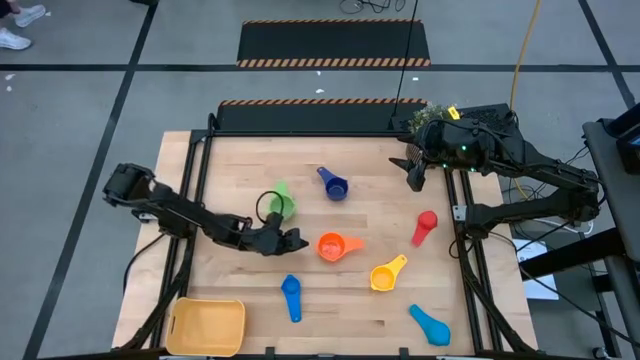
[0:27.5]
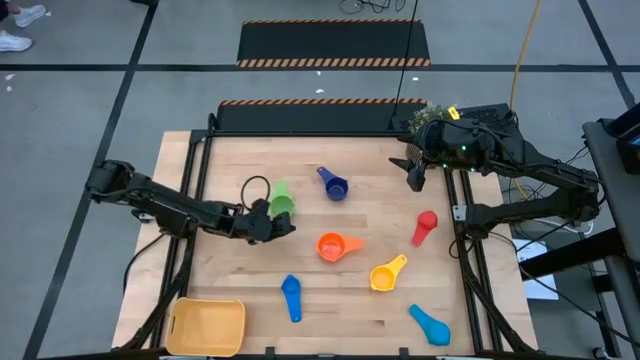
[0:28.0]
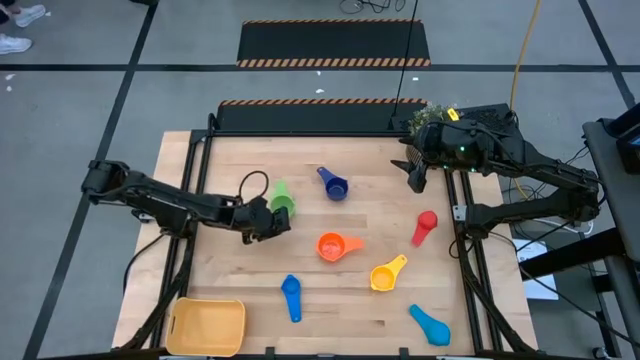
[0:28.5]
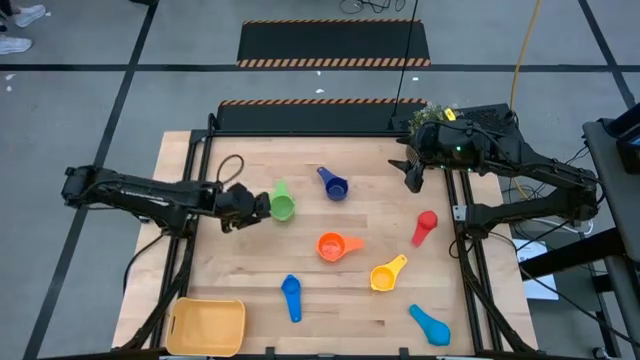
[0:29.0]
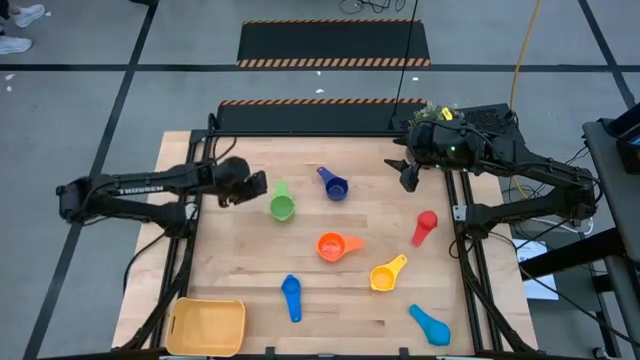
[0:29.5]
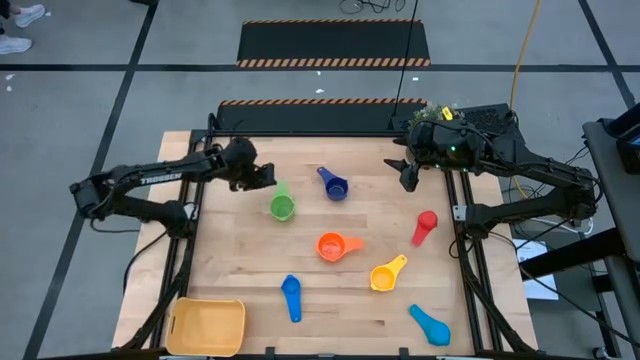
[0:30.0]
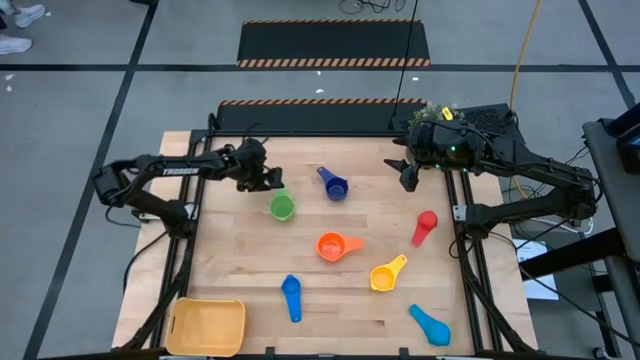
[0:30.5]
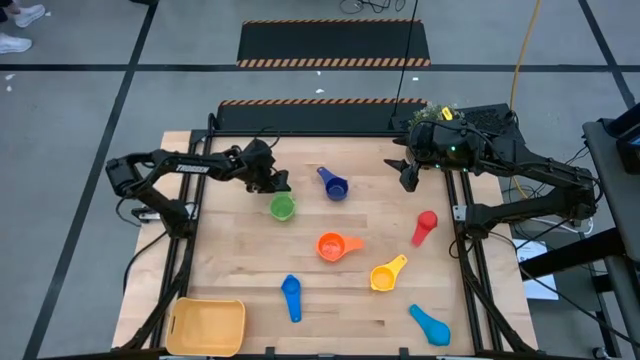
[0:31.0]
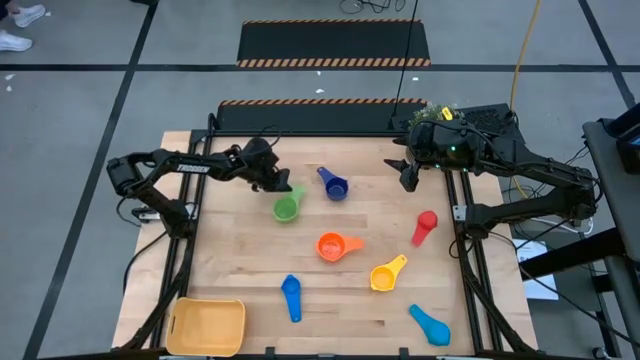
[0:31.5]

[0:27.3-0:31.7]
Task: Nest measuring cups in basket
Stack the green measuring cup on top of the orange measuring cup

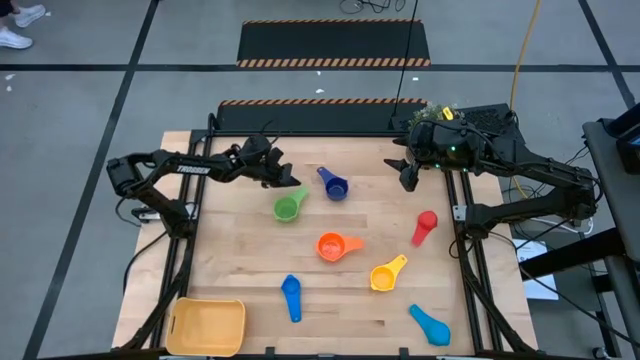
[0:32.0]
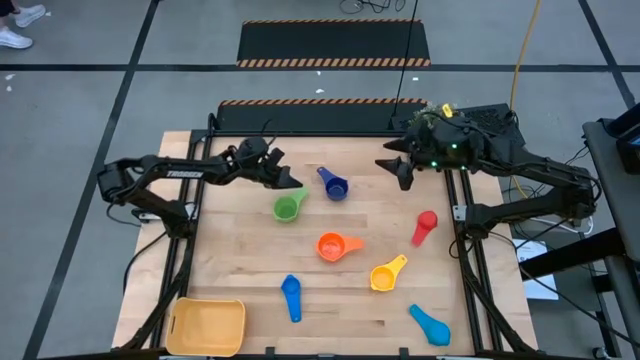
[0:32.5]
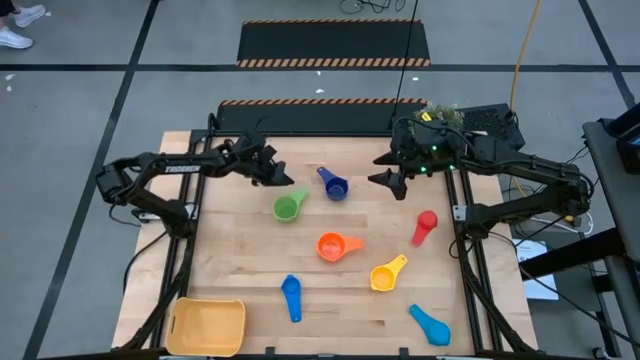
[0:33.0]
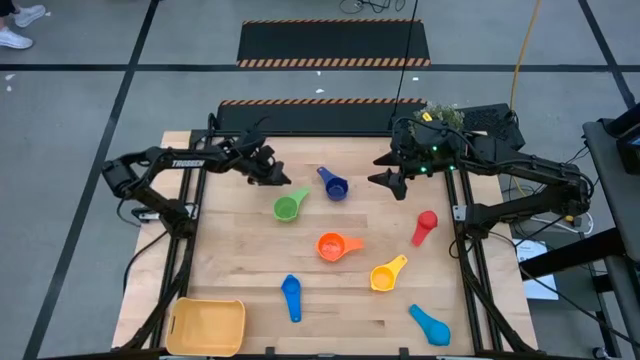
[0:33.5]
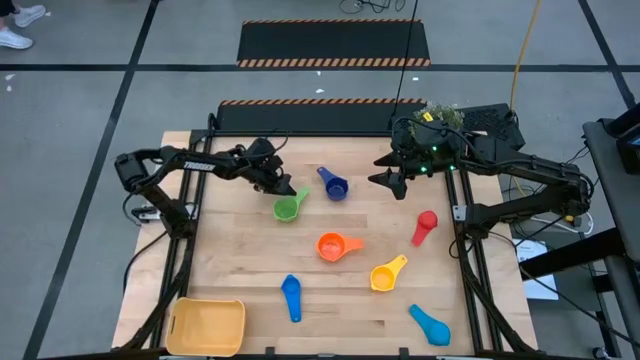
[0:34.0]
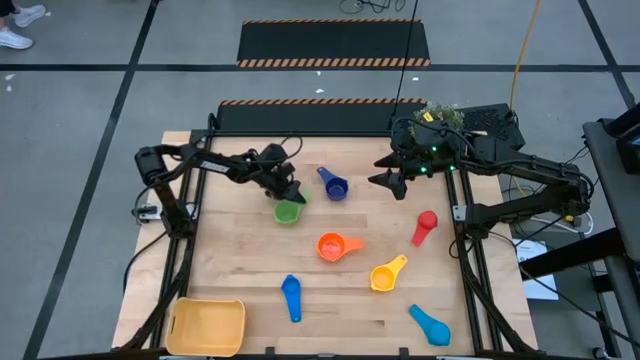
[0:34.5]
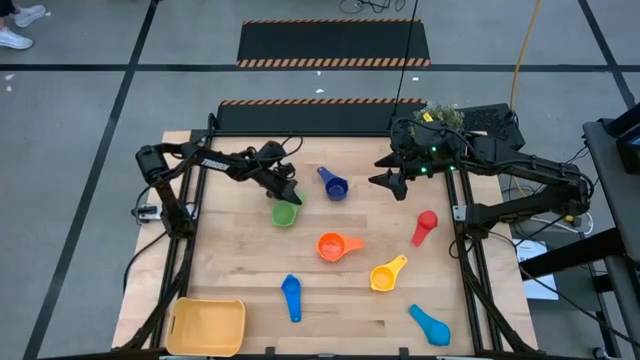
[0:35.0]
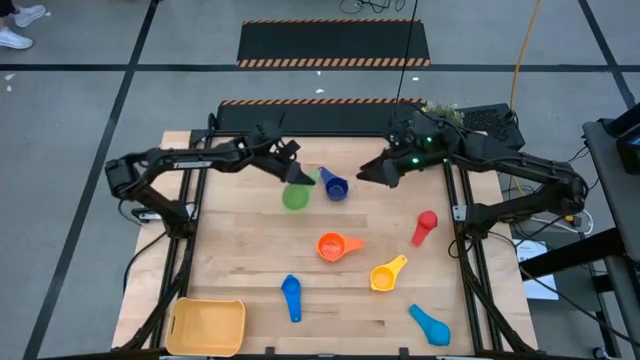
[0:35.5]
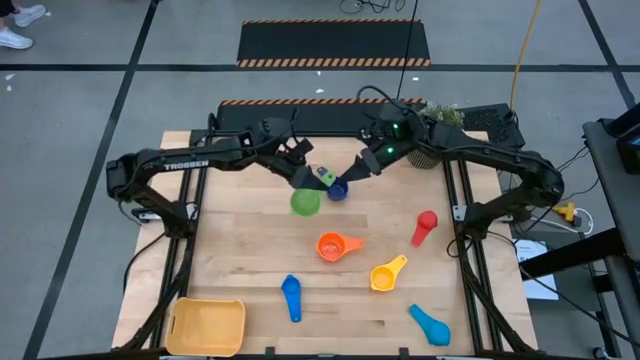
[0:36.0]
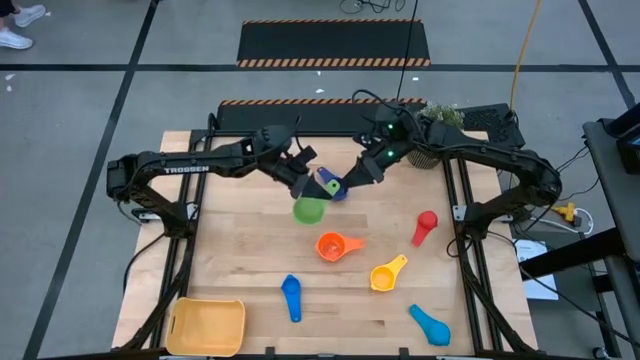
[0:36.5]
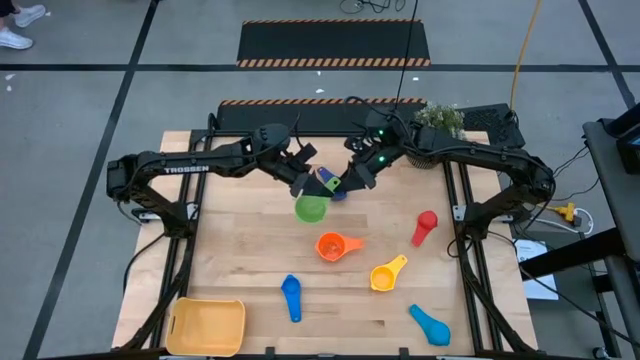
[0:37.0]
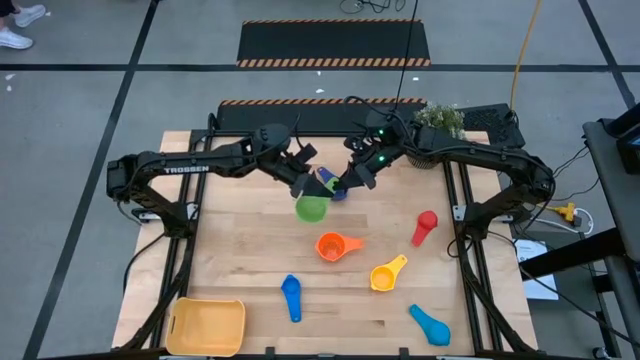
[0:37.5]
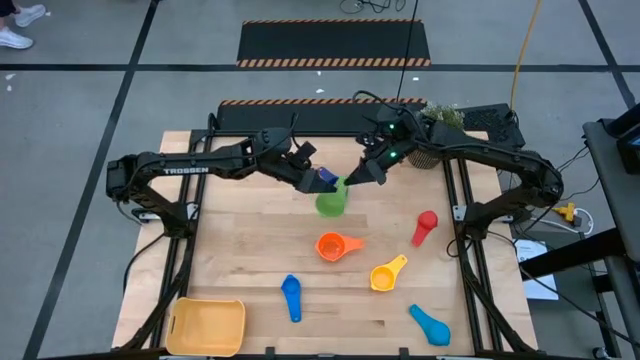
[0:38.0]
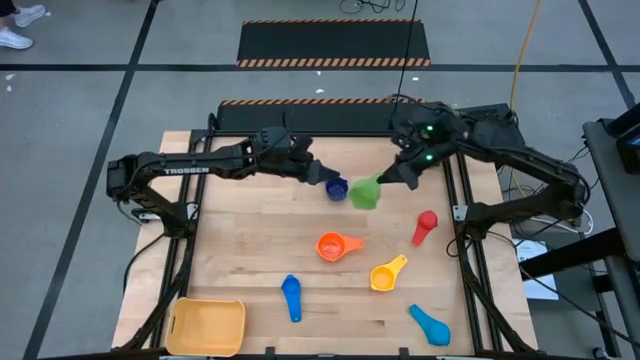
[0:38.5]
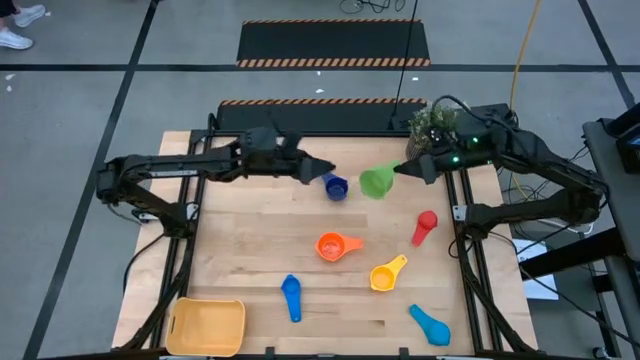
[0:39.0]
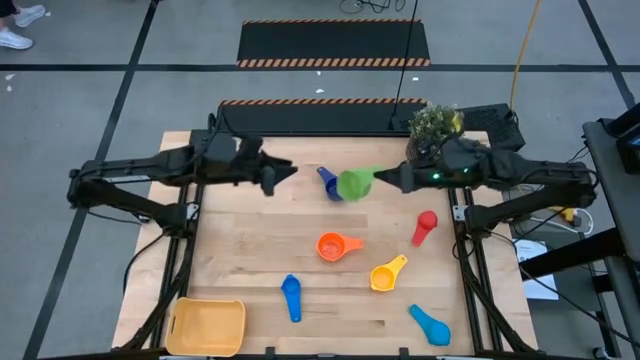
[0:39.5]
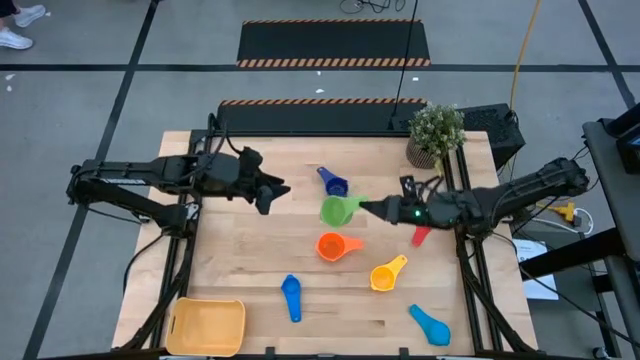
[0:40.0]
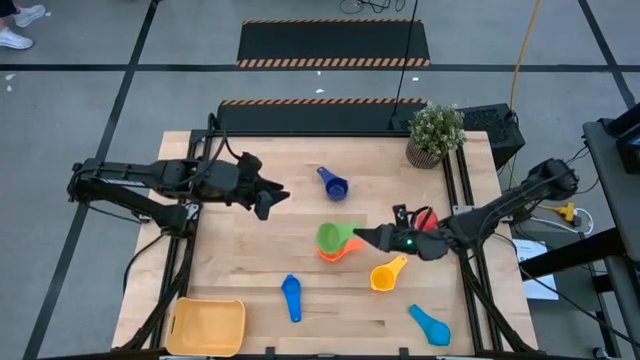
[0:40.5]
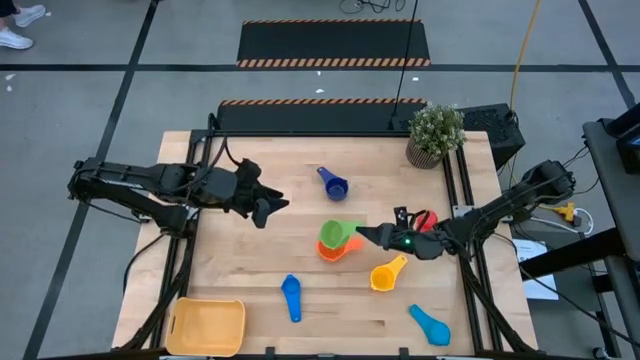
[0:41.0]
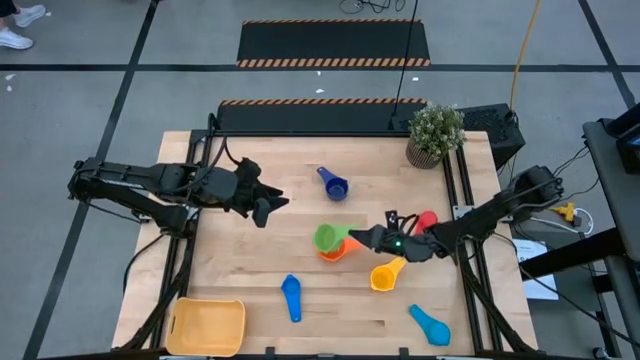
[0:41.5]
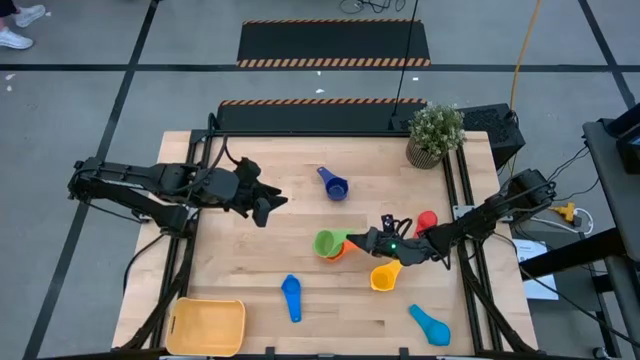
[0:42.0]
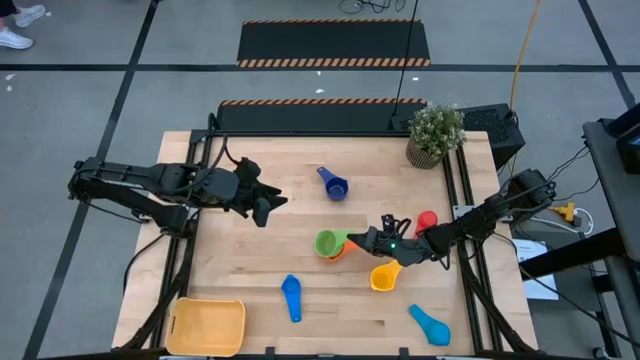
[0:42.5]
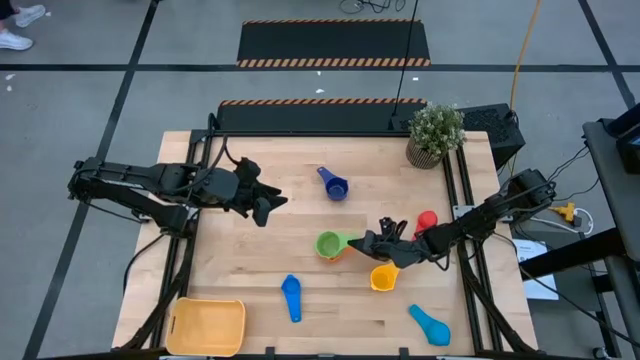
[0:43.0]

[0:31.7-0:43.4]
Stack the green measuring cup on top of the orange measuring cup

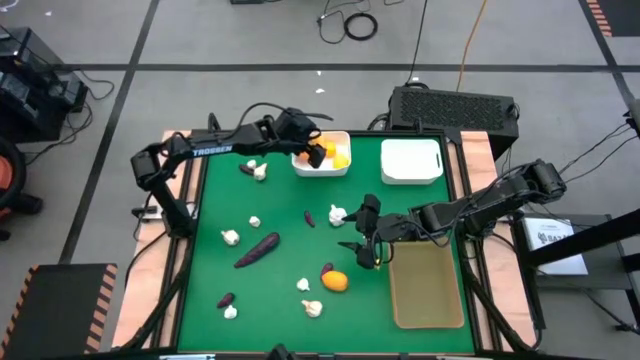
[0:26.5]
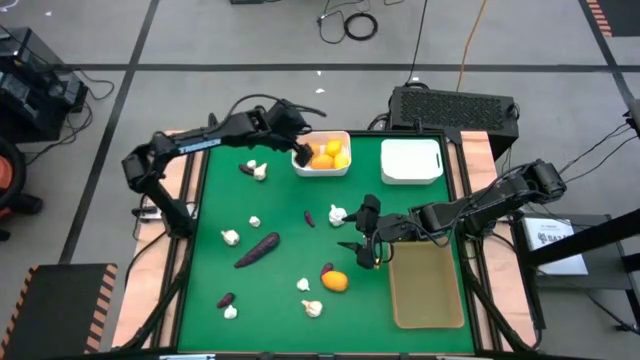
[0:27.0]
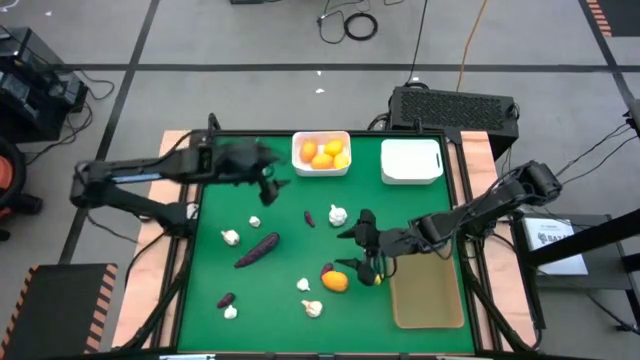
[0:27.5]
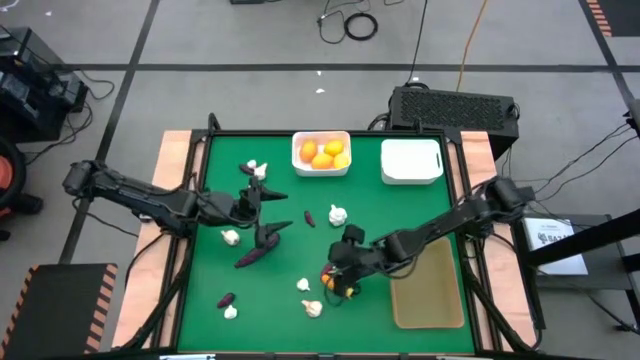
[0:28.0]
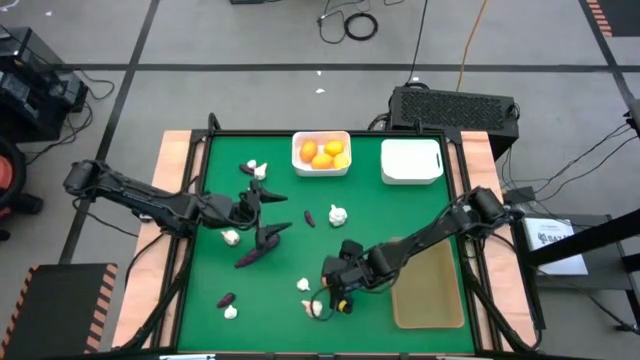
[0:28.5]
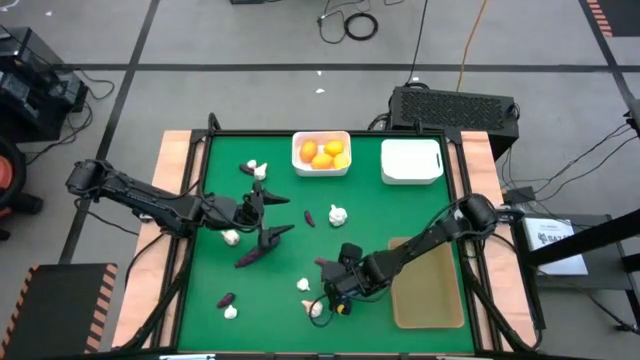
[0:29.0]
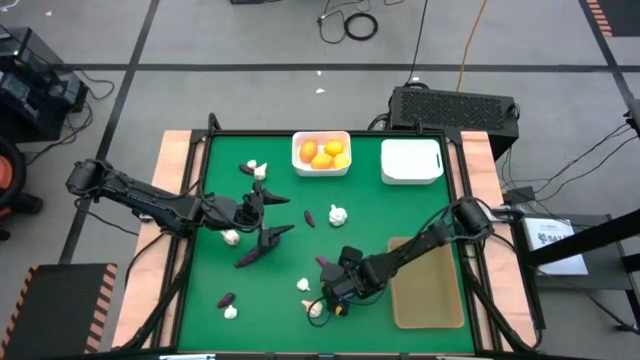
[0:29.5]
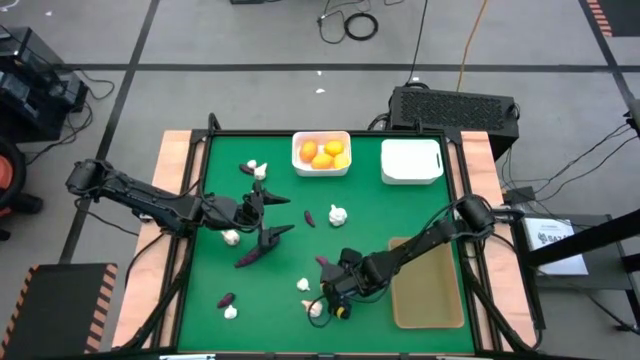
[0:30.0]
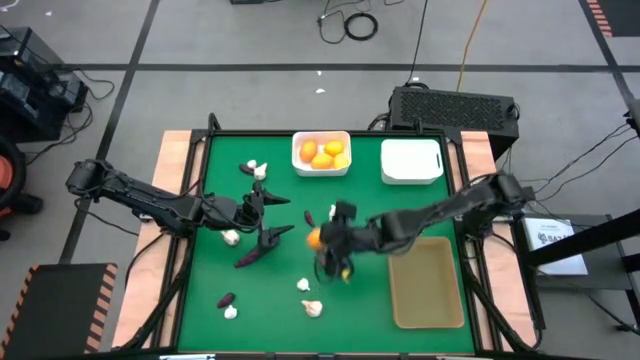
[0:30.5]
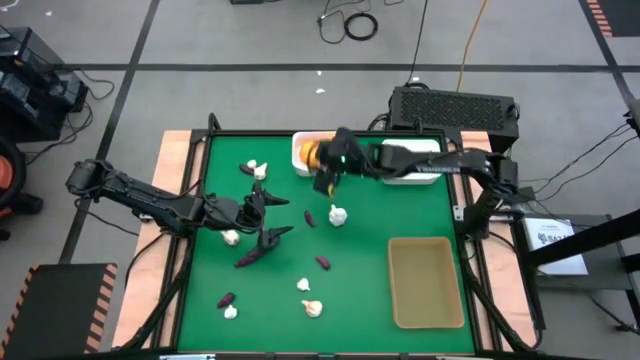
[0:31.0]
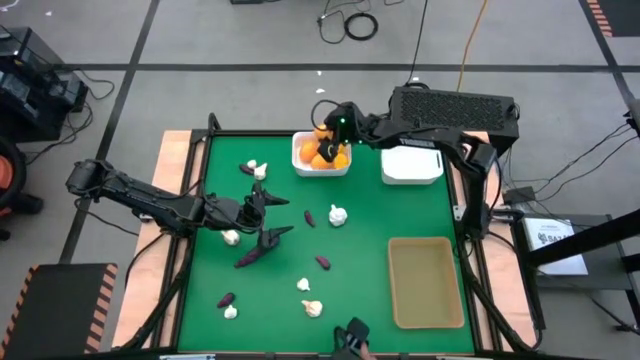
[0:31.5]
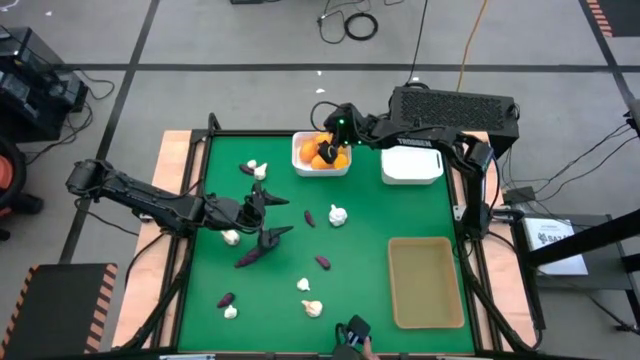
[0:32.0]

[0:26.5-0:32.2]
Task: Sort produce into baskets
Put the lemon into the left white bin
